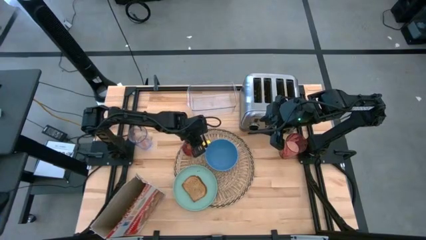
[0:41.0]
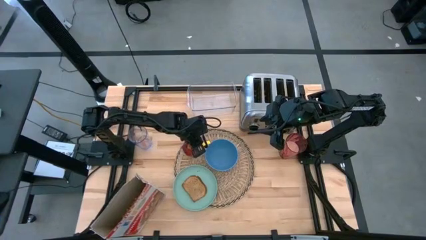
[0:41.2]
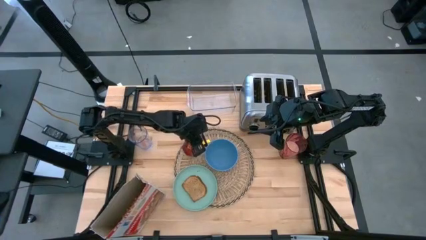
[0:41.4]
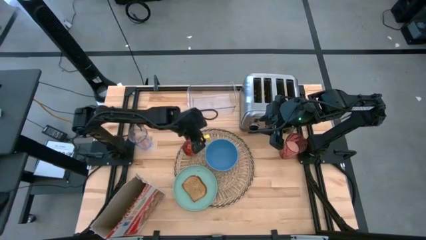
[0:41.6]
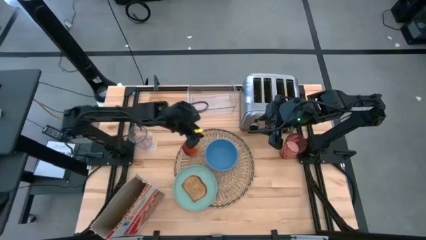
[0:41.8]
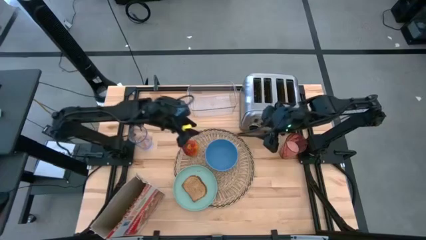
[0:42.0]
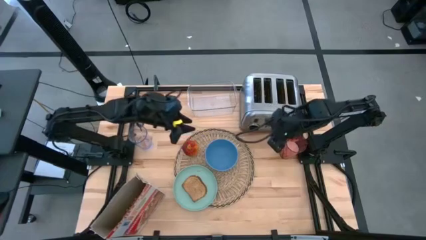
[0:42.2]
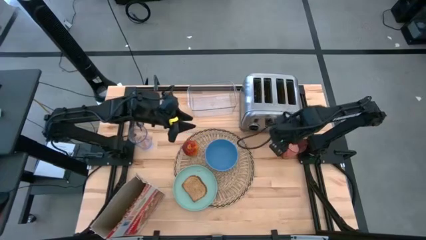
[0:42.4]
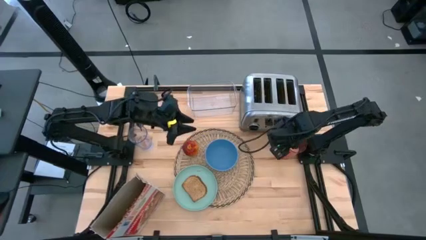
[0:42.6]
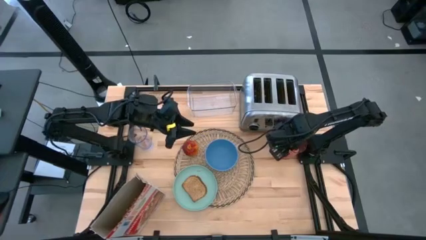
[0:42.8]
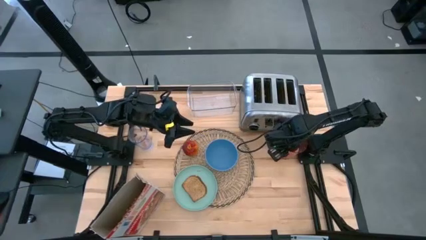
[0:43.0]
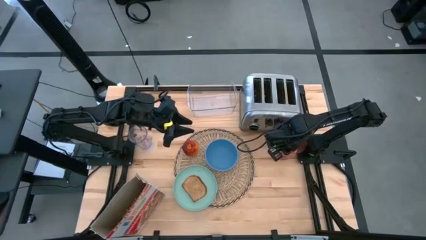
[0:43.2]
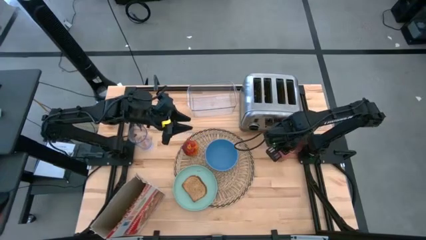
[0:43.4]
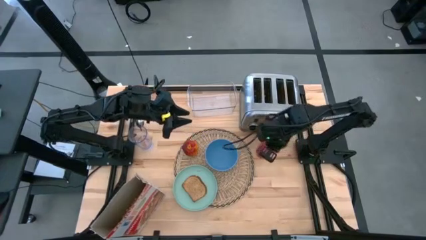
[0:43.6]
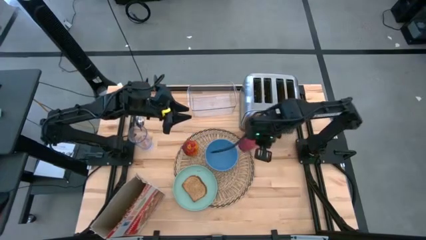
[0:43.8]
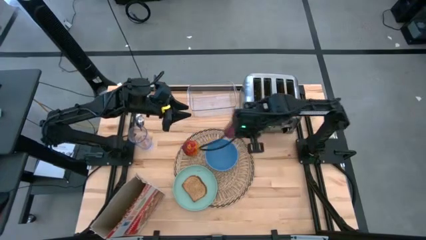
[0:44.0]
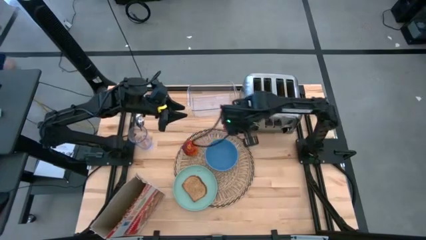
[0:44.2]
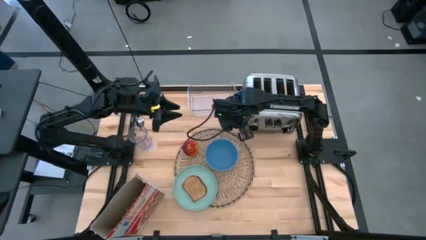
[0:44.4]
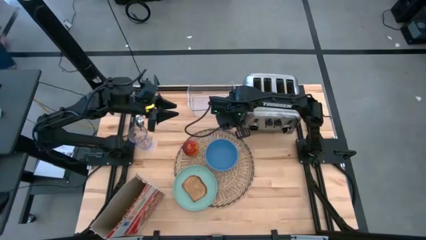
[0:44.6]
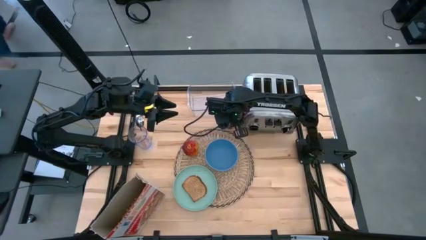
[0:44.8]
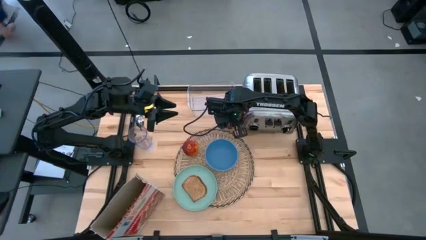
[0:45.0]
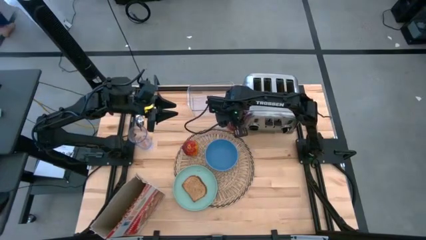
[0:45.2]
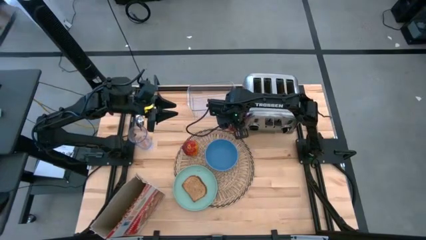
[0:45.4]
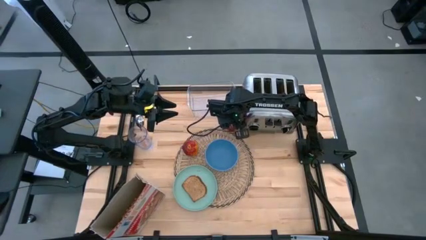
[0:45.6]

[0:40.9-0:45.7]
Task: Arrange a breakfast setting
Move the red glass cup to the top right of the brown table mat

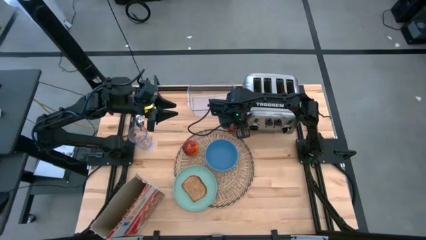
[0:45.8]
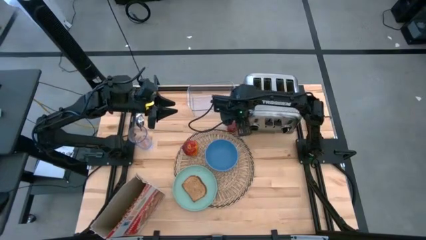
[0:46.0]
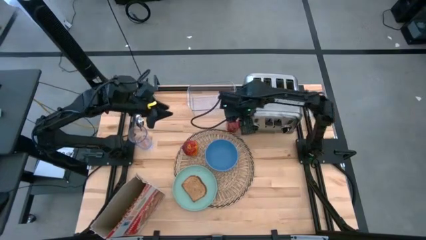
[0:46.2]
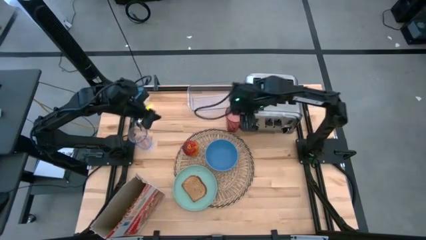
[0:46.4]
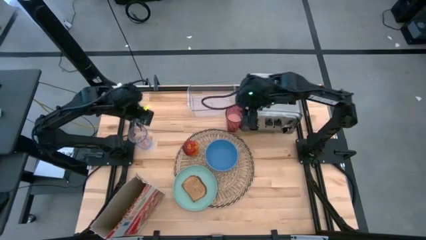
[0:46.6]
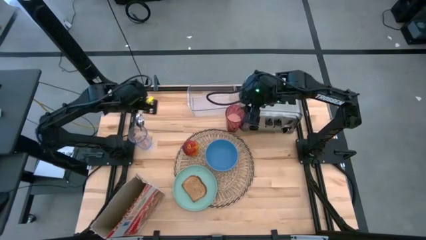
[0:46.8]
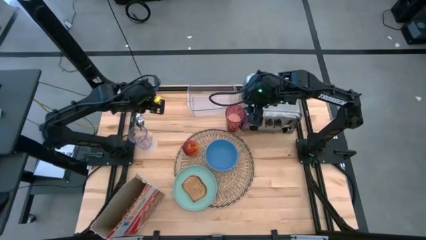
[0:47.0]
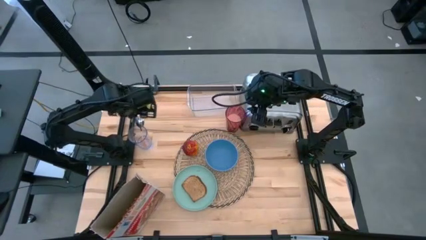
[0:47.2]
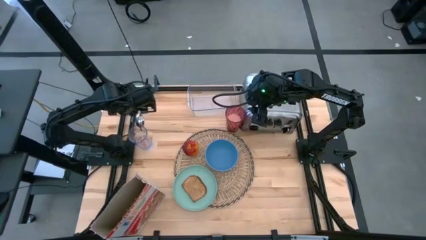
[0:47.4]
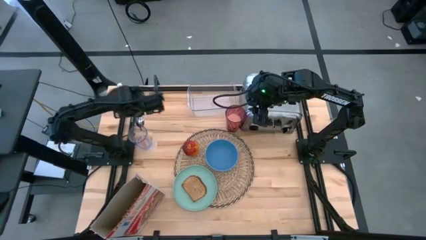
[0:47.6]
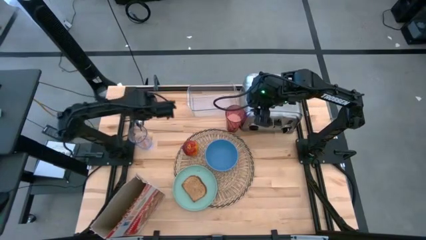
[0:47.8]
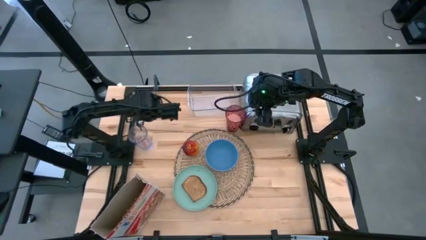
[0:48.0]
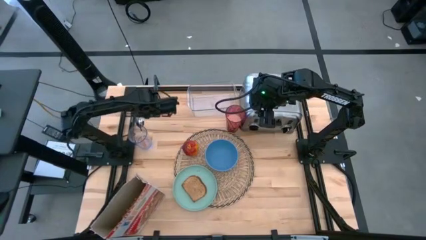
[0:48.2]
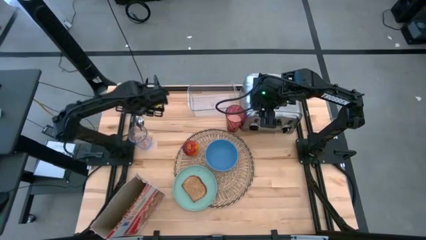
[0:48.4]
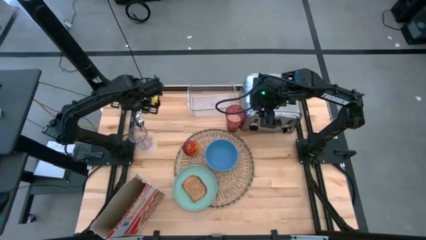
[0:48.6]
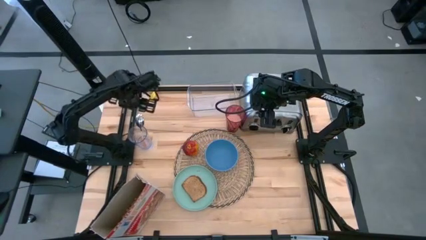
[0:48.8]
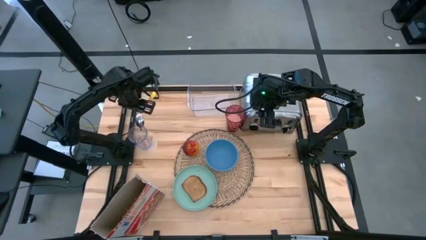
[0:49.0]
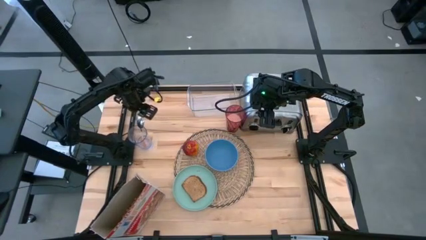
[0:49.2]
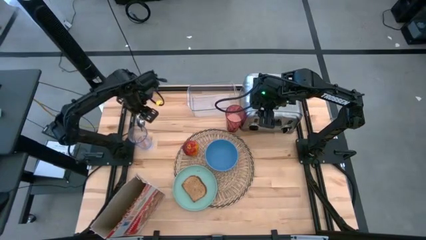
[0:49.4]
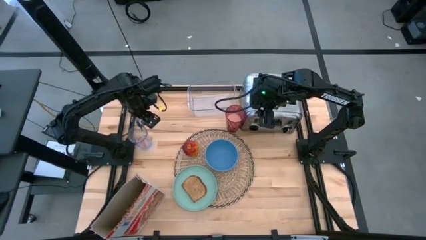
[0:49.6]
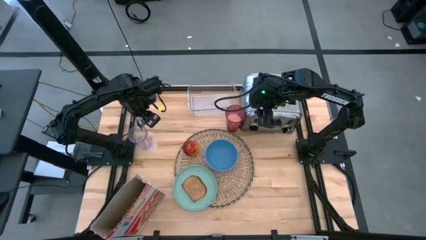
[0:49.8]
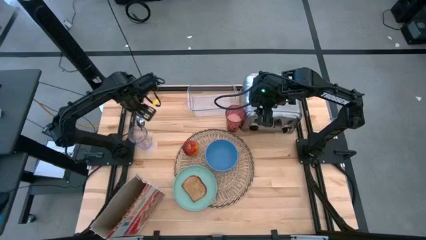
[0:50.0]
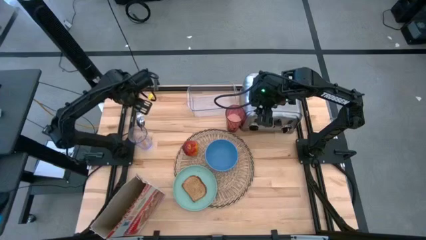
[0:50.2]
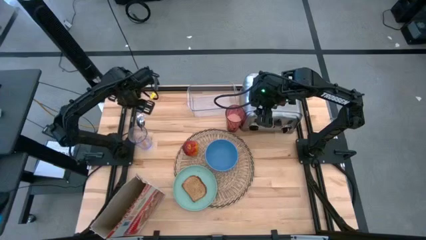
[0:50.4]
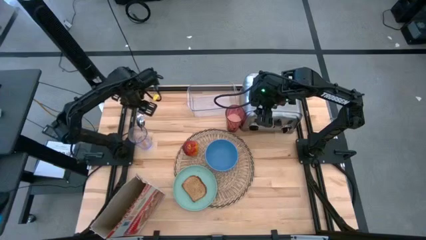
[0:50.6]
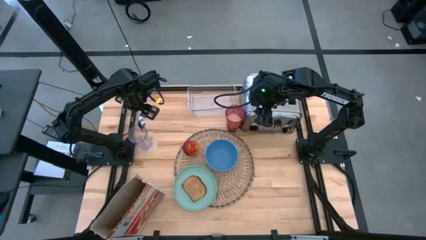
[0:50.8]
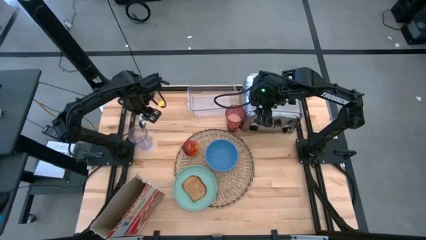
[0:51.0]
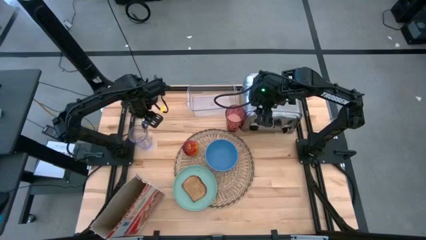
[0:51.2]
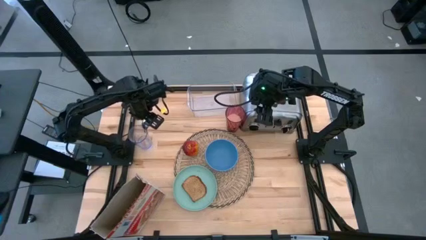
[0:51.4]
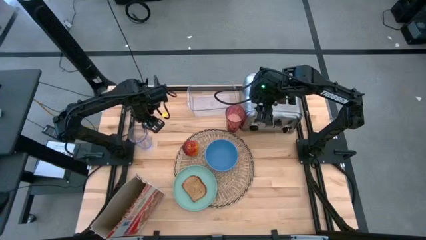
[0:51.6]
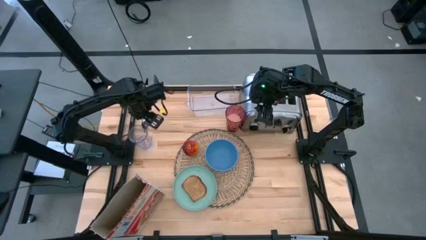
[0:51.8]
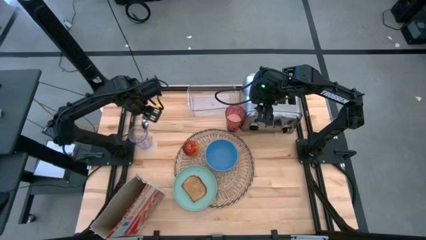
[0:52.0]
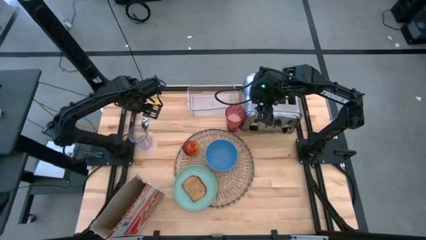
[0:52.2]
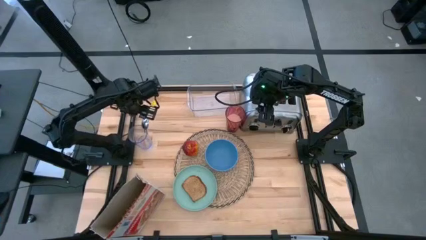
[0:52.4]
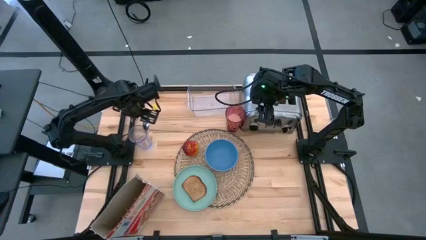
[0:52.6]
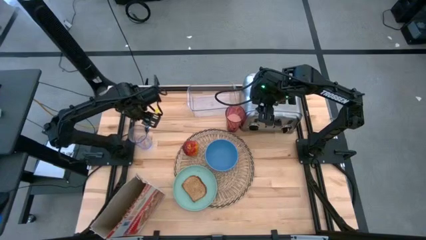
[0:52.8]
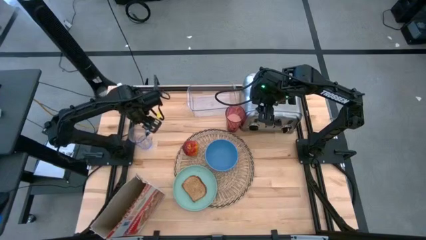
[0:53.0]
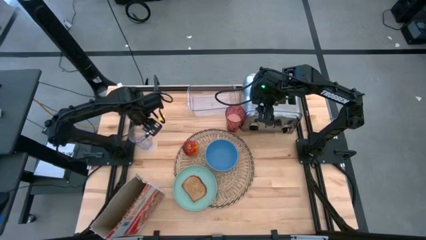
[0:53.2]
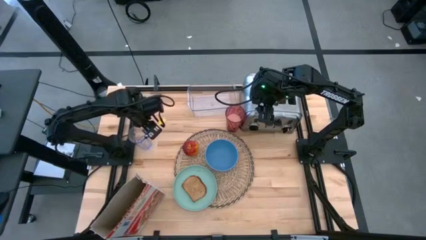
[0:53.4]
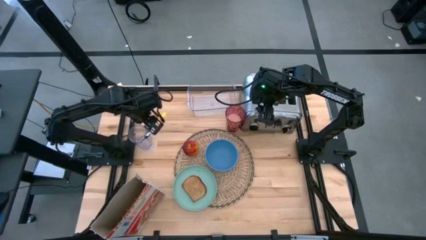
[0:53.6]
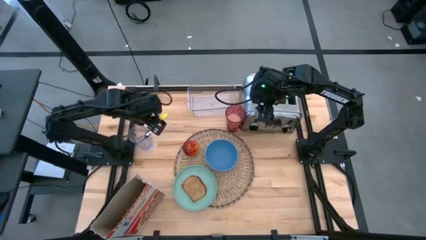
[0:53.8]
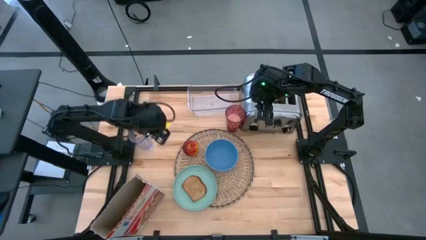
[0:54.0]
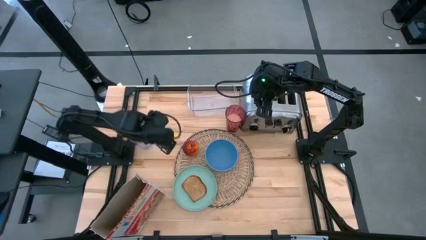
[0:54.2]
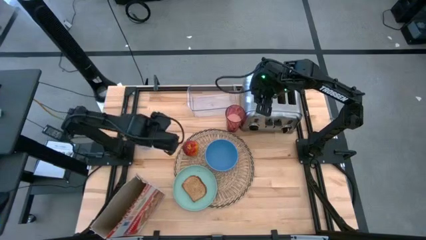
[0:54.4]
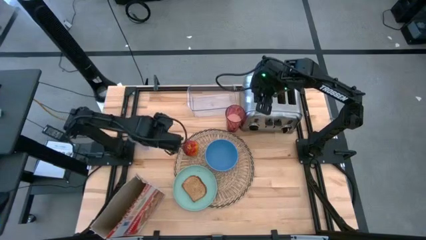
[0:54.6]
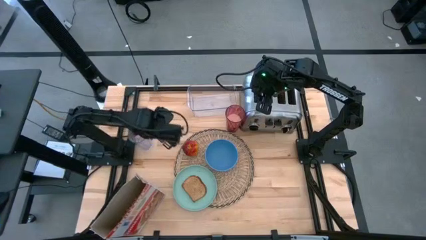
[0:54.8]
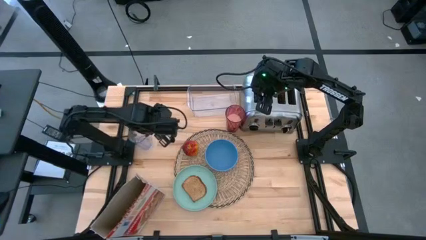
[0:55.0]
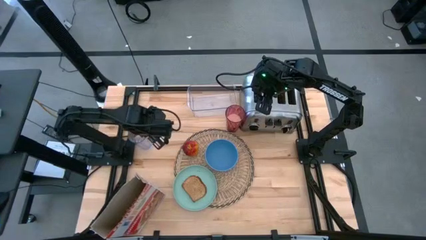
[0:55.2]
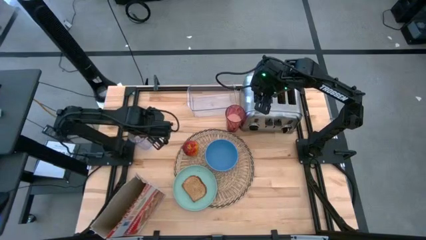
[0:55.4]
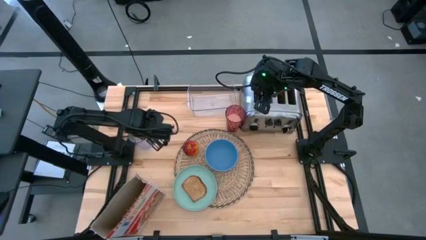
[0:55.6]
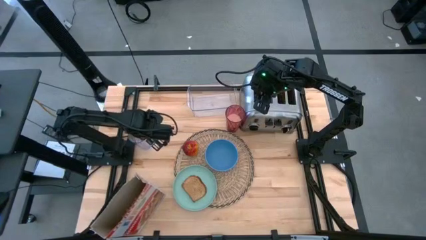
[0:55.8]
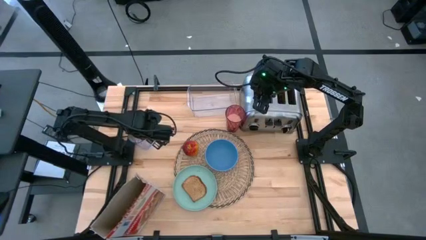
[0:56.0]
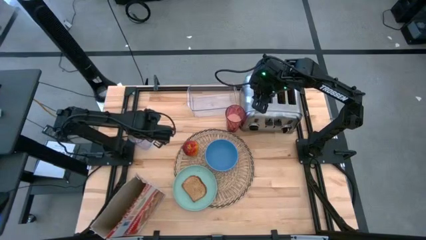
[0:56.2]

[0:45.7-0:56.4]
Put the orange spoon on the brown table mat to the right of the blue bowl

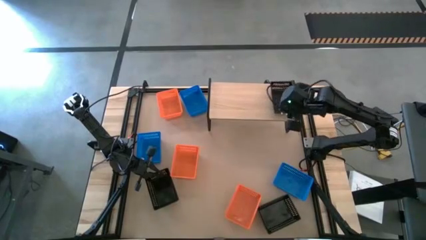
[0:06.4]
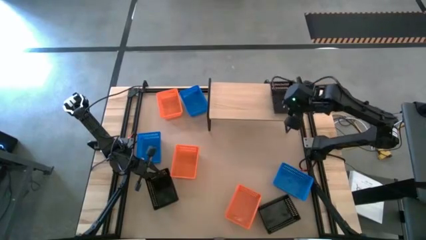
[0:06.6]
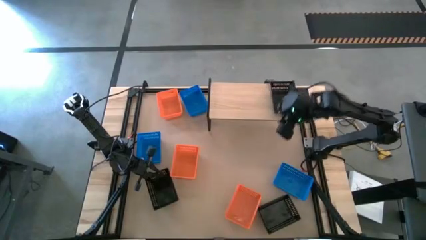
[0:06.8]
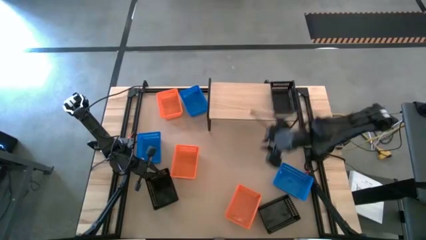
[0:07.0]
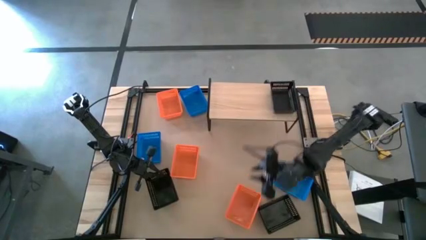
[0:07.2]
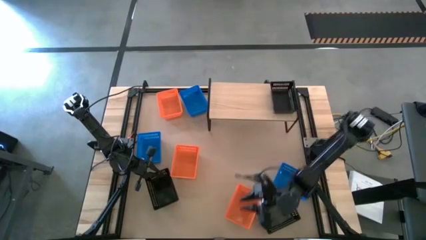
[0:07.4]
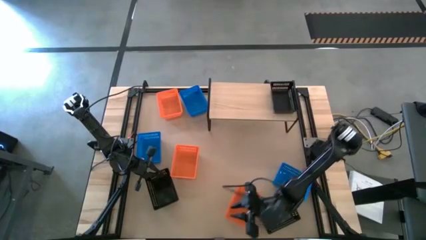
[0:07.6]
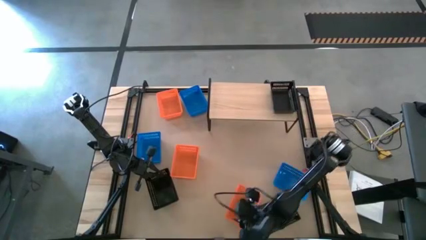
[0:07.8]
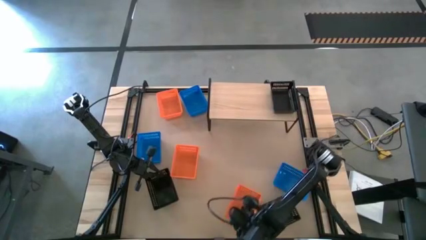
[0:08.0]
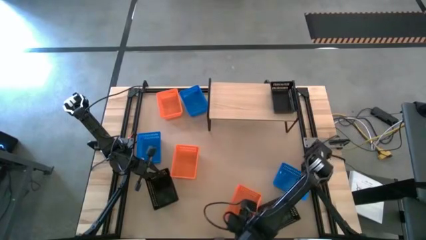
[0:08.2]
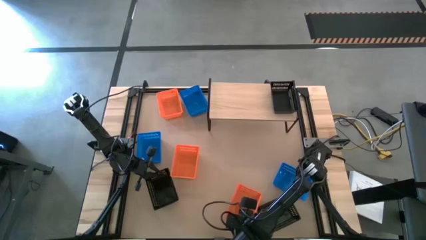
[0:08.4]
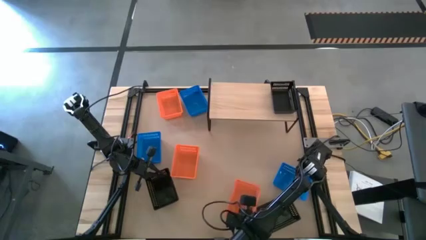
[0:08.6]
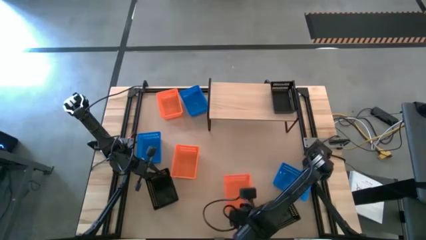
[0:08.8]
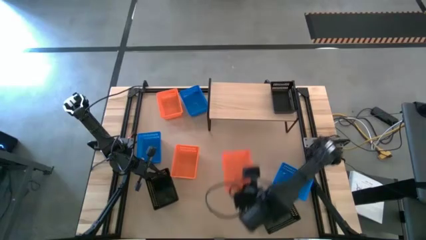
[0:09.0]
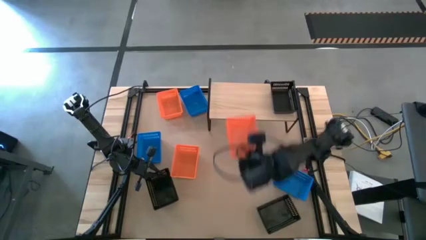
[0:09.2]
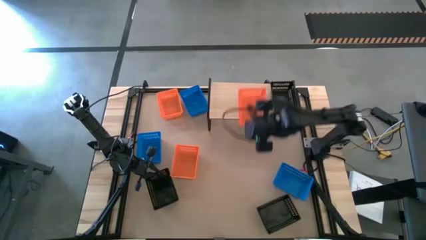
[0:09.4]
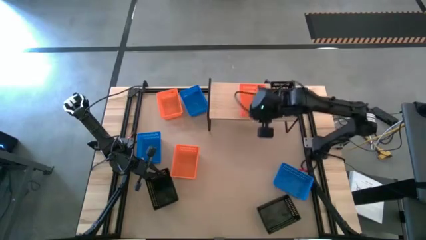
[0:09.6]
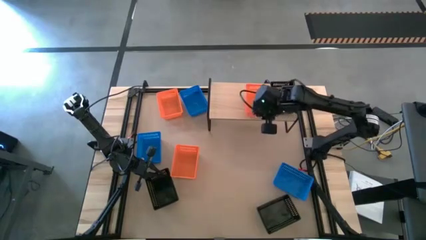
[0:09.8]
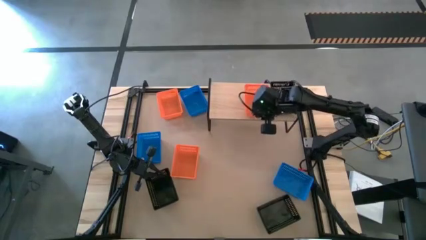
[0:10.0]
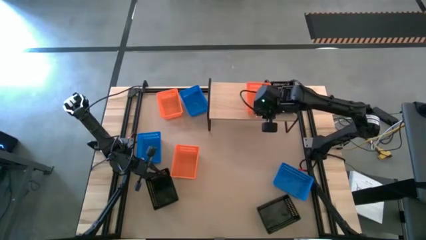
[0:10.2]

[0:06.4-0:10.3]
Task: Stack baskets on shelf by color
Put the bottom orange bin on the shelf
